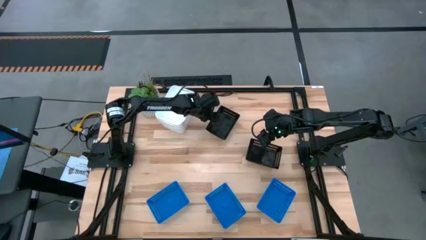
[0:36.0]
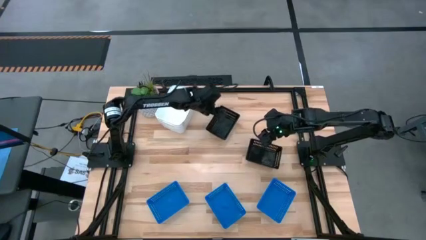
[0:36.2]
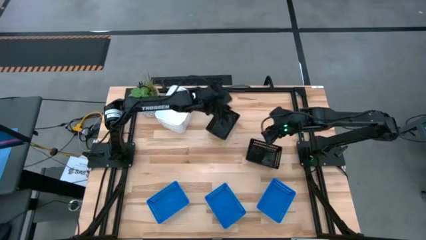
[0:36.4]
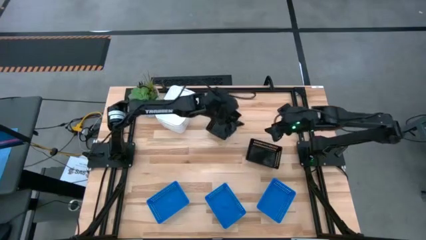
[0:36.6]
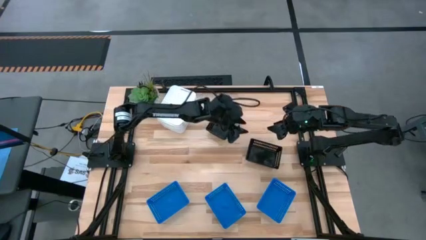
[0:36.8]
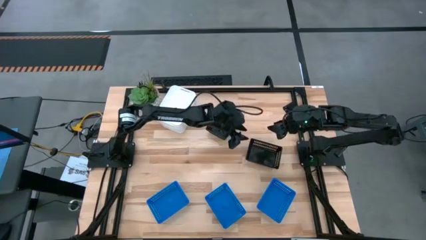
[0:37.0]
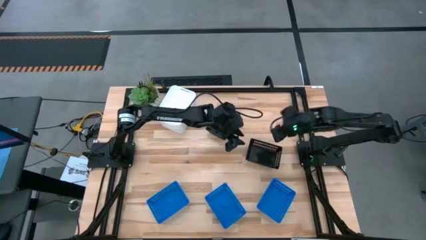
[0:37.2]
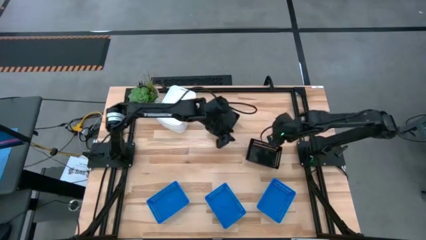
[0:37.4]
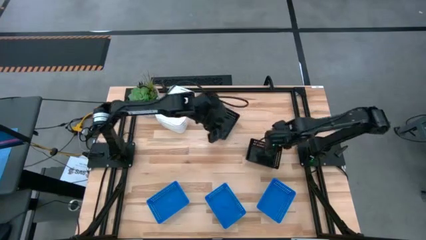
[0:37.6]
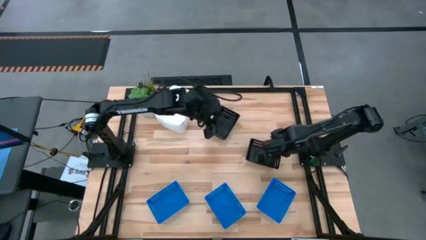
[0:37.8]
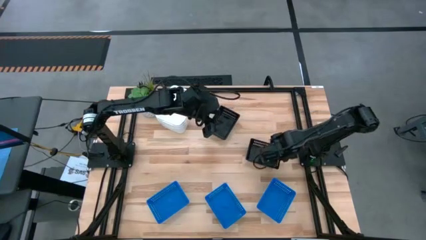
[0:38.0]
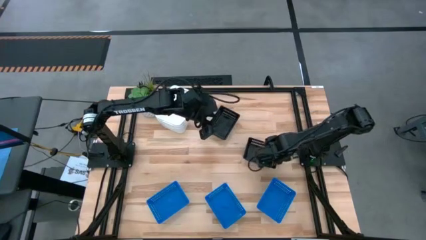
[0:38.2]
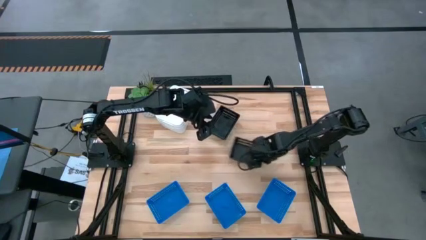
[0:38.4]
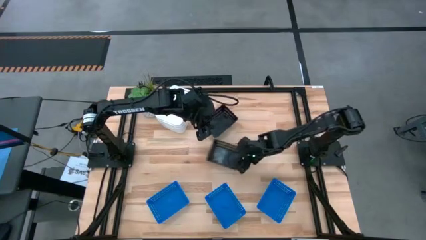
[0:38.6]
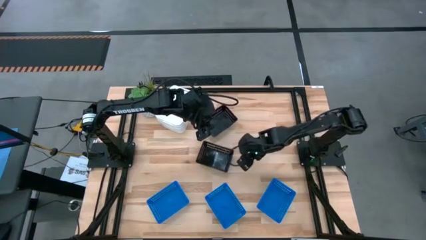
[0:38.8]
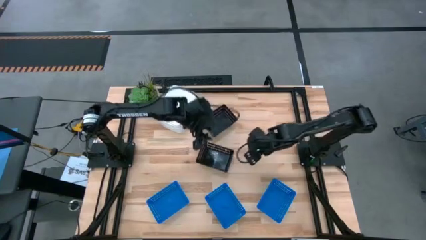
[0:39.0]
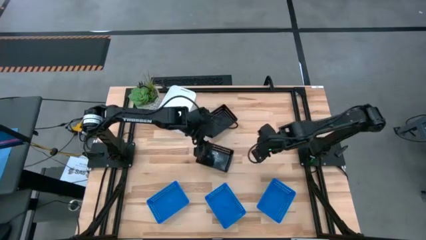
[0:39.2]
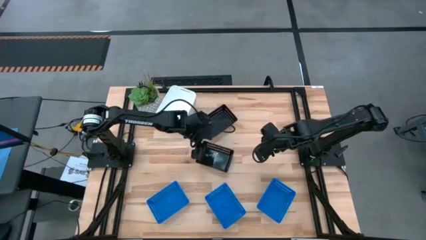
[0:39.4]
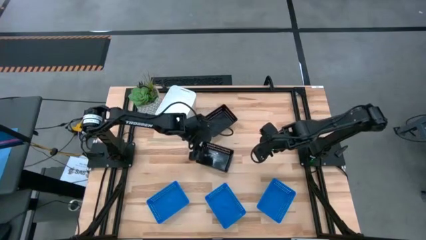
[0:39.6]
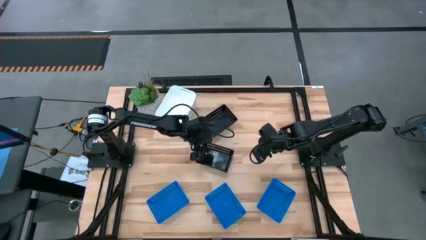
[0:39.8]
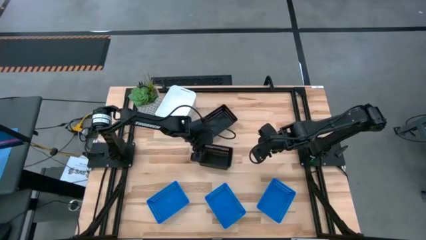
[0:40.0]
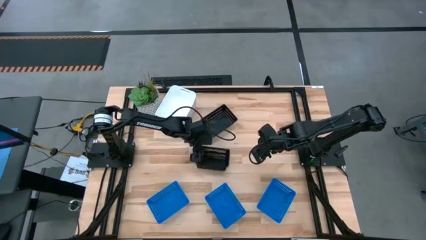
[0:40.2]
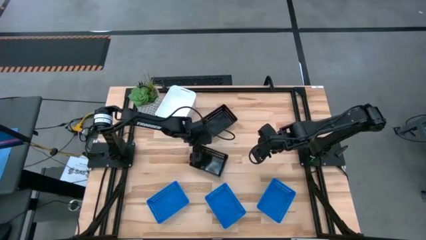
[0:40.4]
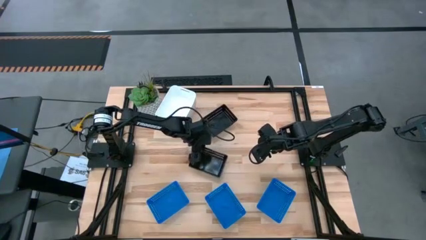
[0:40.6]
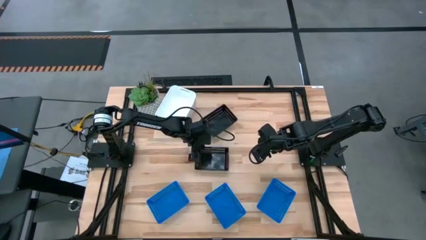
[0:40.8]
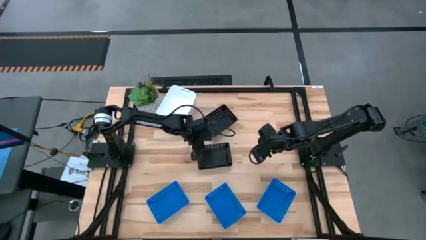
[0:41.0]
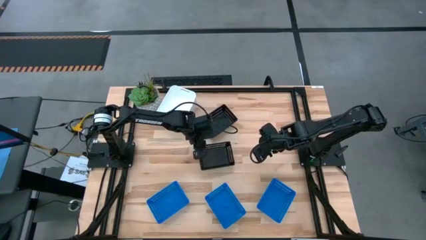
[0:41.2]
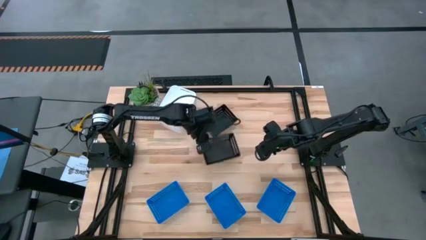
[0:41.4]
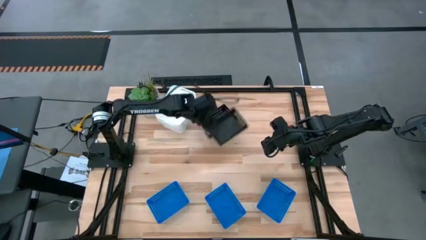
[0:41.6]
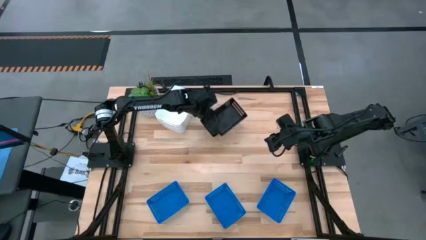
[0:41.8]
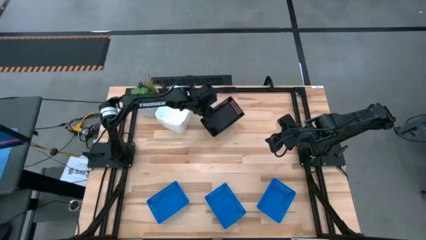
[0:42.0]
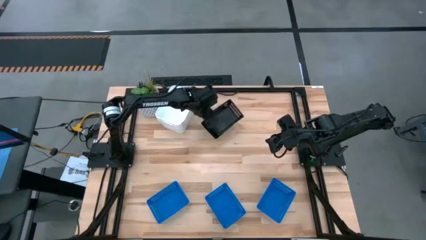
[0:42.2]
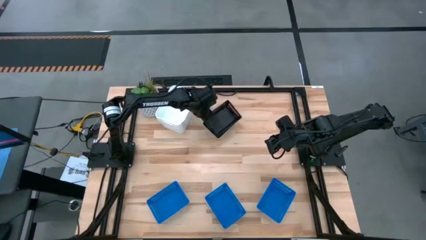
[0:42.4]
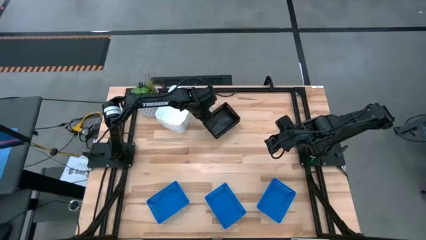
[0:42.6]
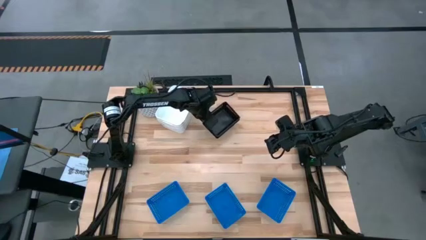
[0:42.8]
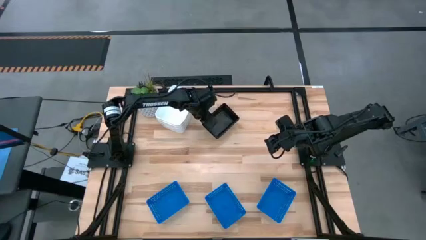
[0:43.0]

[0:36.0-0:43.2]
Stack the black bin on the black bins

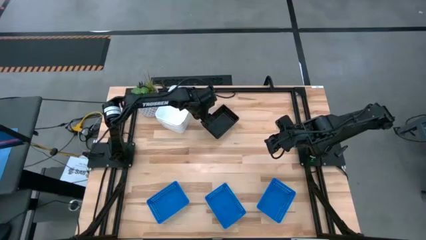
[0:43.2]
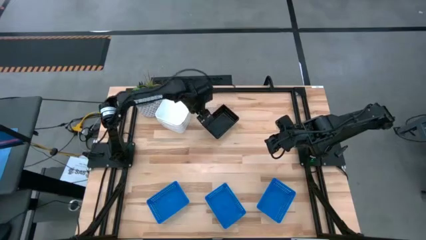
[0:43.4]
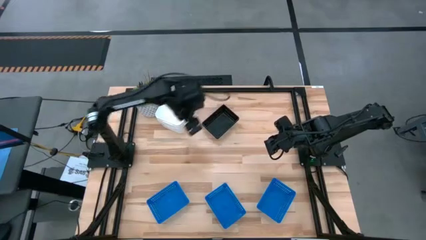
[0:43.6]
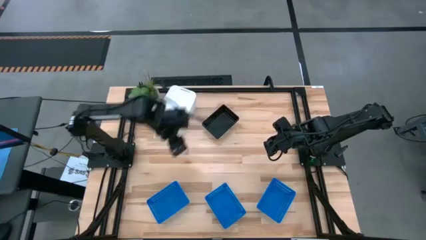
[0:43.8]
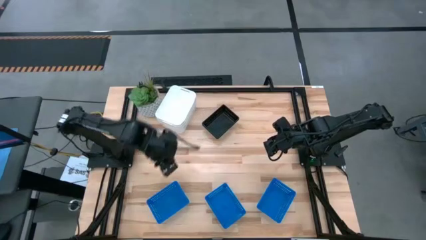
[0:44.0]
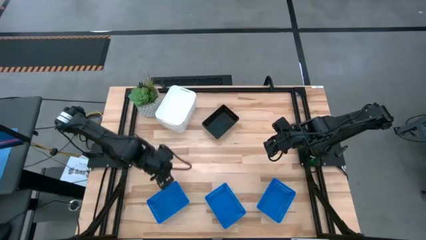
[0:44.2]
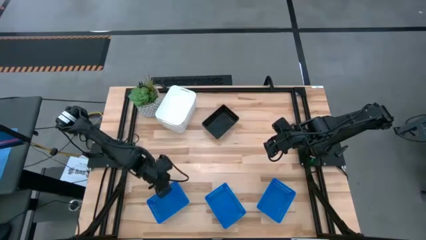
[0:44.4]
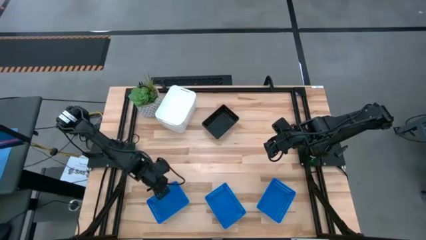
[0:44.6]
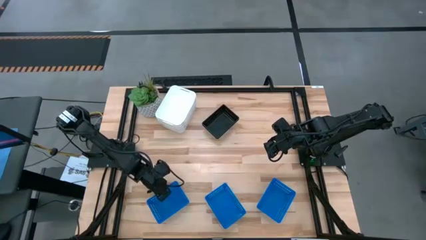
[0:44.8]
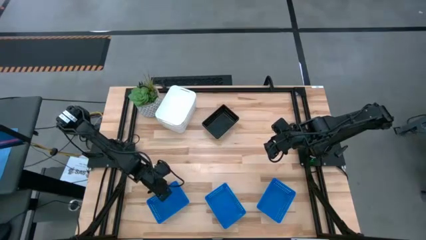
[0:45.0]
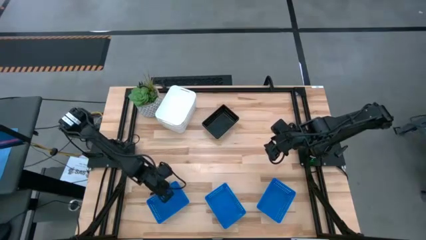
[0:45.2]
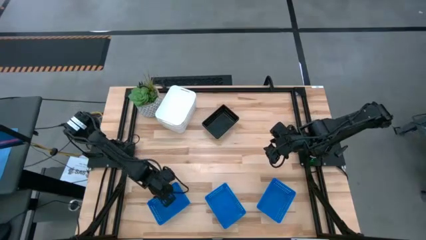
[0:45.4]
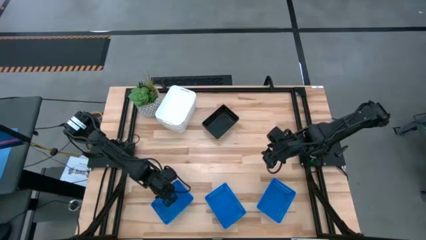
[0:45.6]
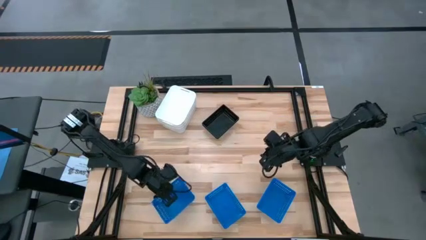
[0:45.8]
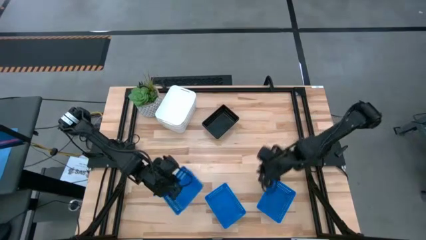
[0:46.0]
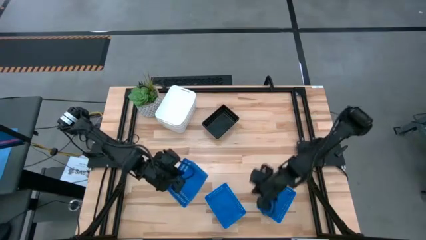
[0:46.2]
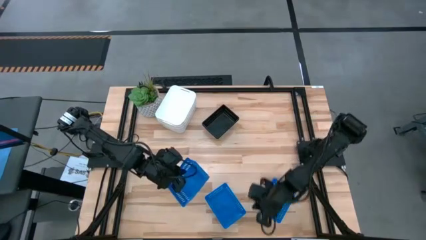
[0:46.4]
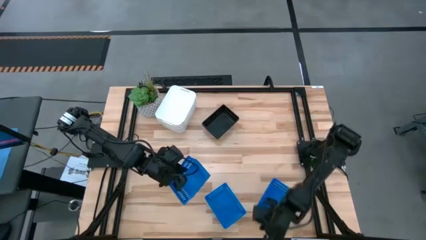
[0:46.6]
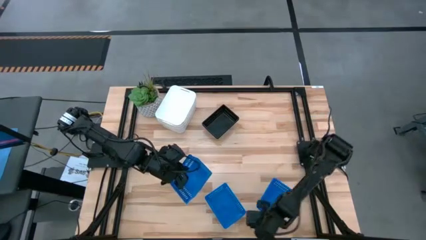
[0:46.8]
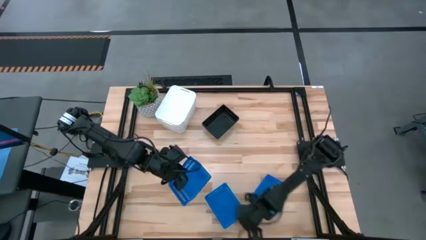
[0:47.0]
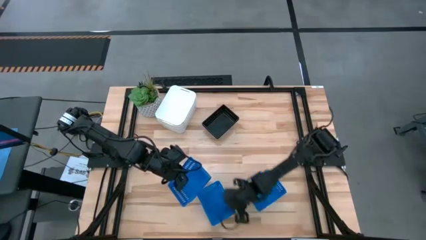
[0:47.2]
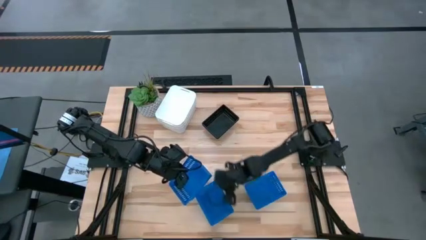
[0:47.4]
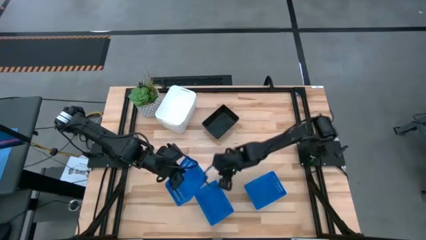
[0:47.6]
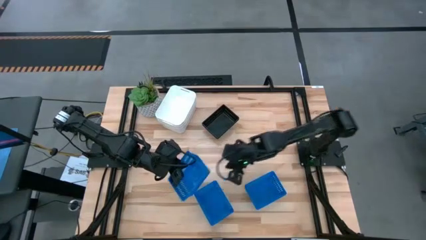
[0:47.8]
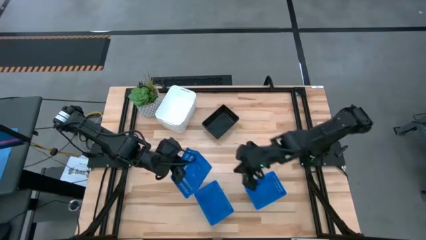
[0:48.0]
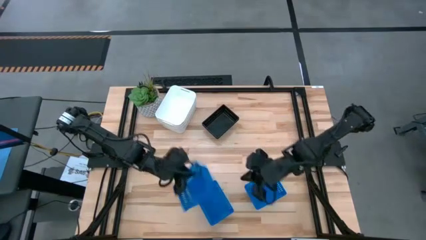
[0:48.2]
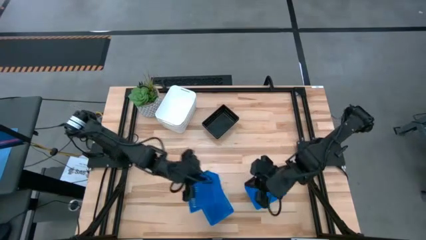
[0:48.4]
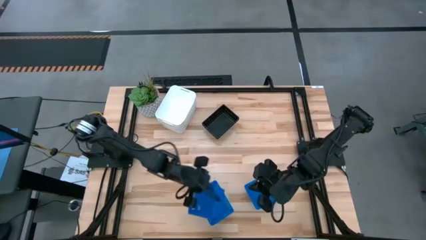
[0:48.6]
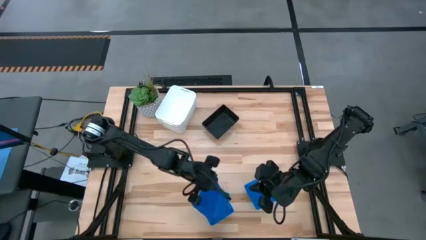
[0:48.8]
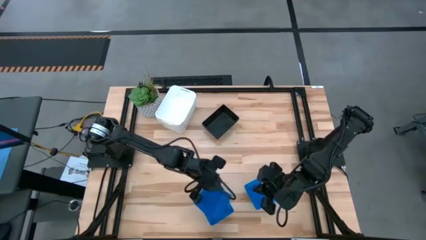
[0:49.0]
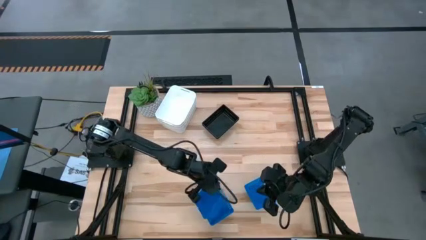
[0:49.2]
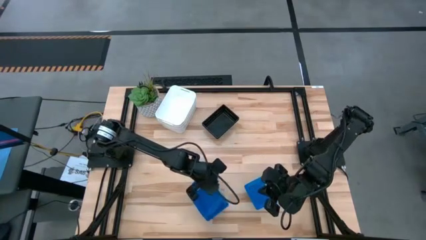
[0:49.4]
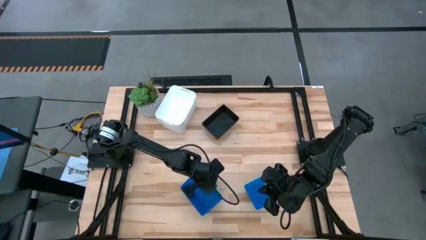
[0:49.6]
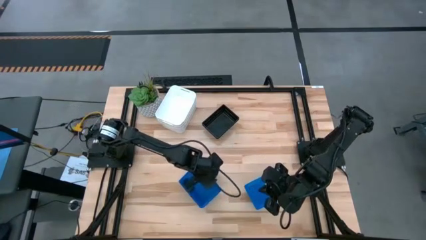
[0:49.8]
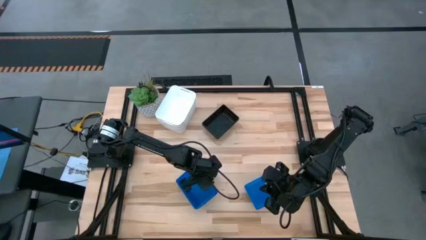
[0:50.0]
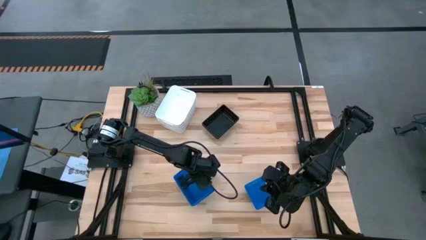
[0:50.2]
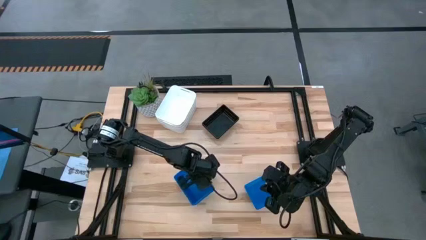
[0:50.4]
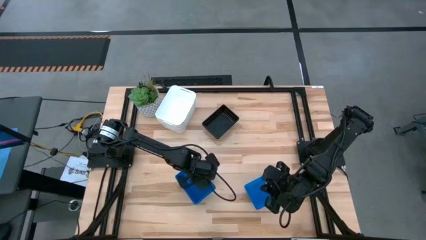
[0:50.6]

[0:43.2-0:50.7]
Stack the left blue bin on the middle blue bin
